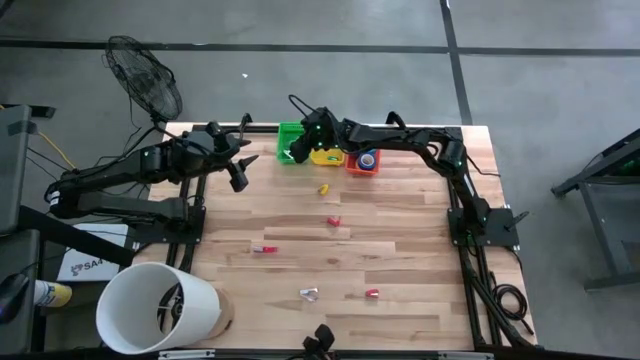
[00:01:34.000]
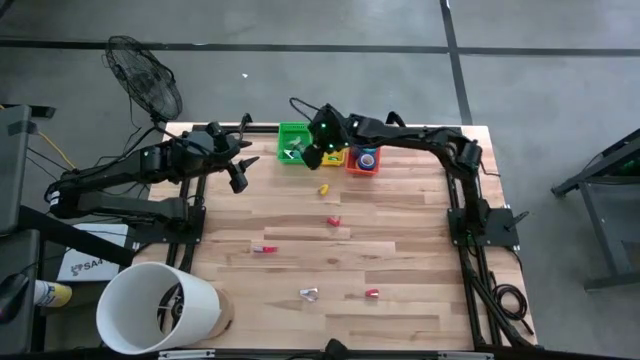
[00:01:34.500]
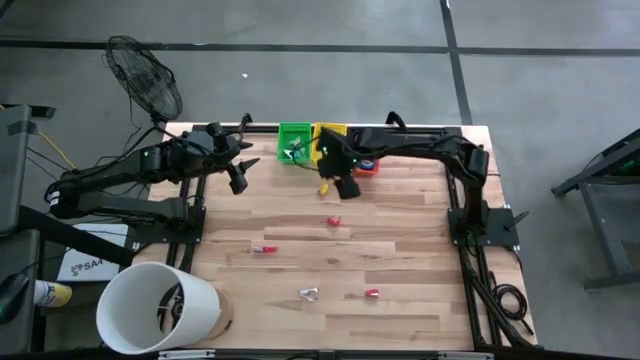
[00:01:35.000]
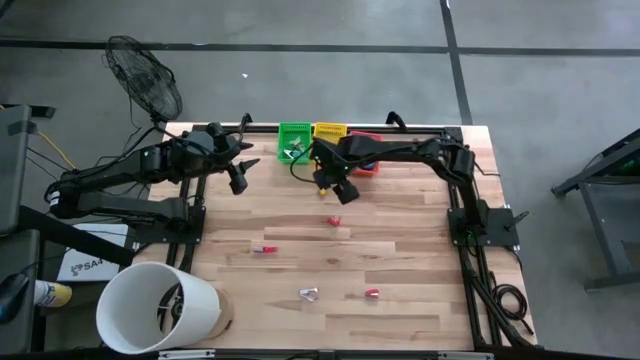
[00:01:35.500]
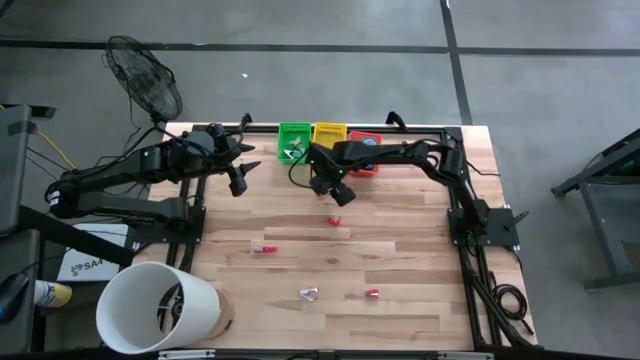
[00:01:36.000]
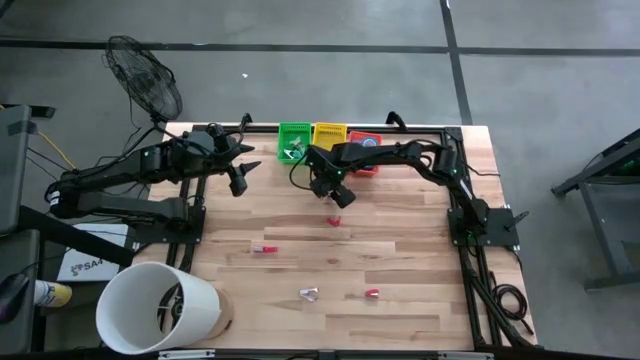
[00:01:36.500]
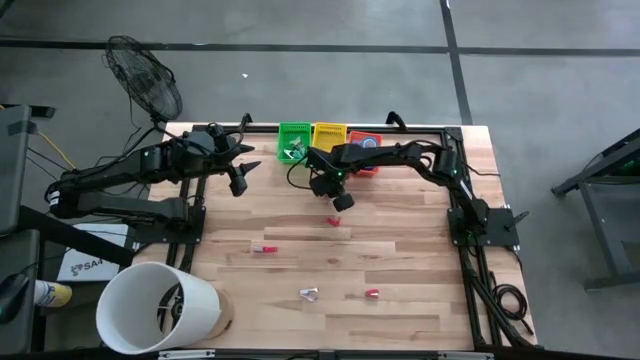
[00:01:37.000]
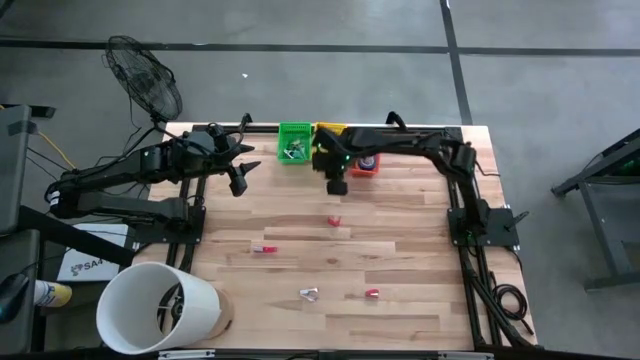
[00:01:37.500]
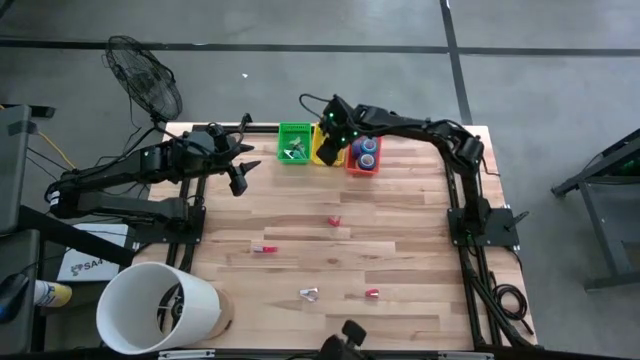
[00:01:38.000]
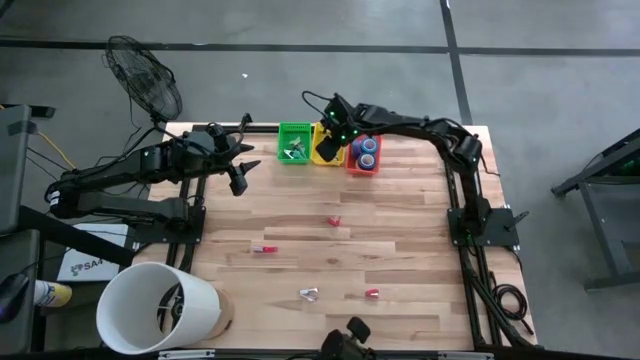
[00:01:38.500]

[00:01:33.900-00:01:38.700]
Task: Pick and place Stapler, Stapler remover, tape
Put the yellow stapler into the yellow bin

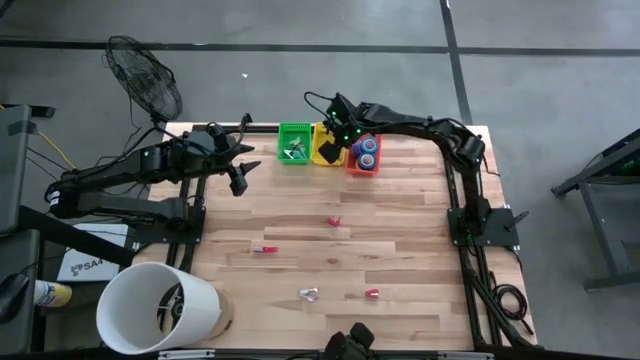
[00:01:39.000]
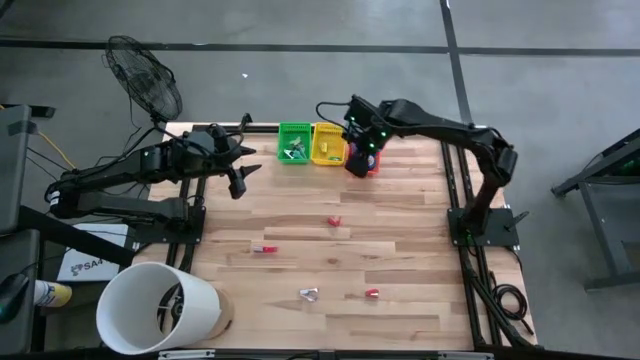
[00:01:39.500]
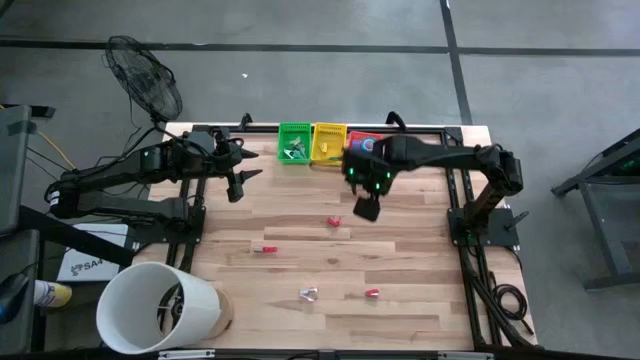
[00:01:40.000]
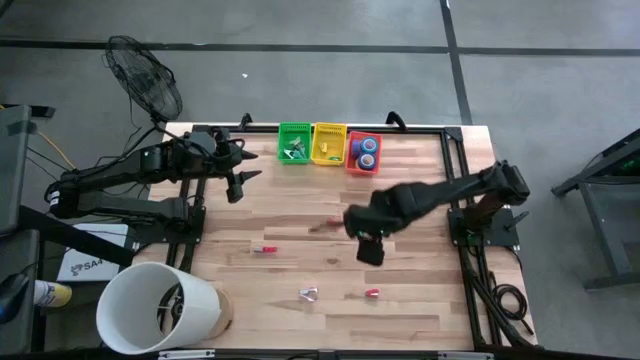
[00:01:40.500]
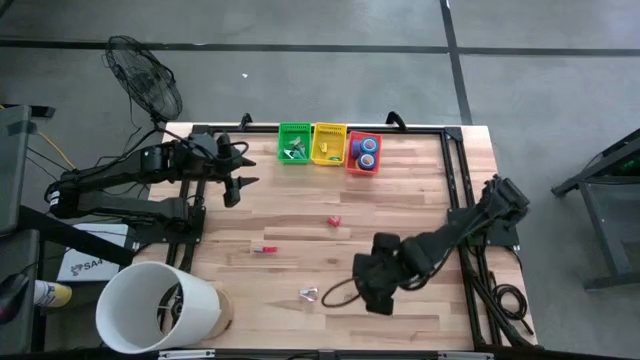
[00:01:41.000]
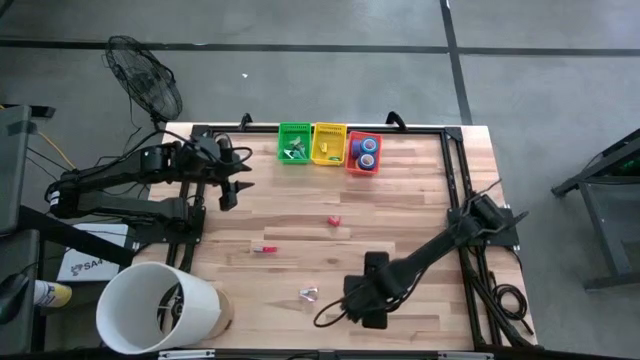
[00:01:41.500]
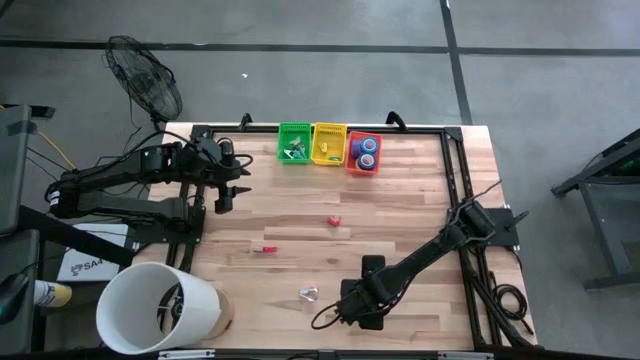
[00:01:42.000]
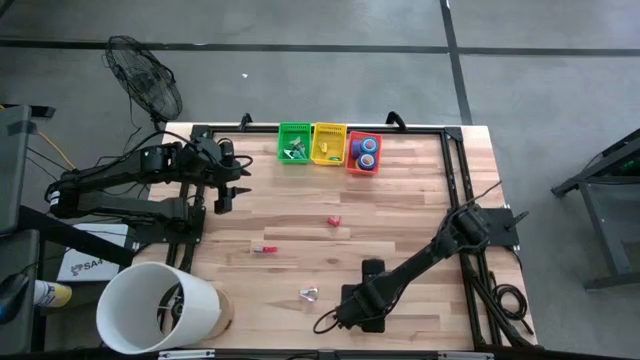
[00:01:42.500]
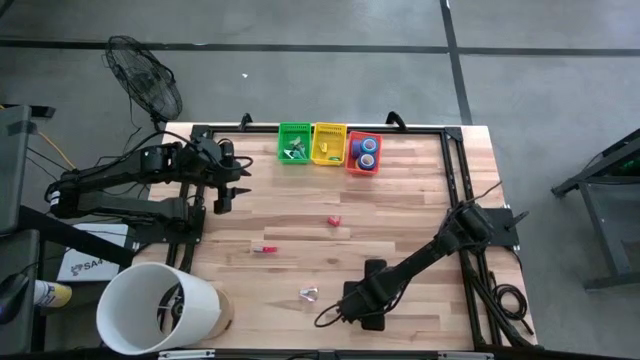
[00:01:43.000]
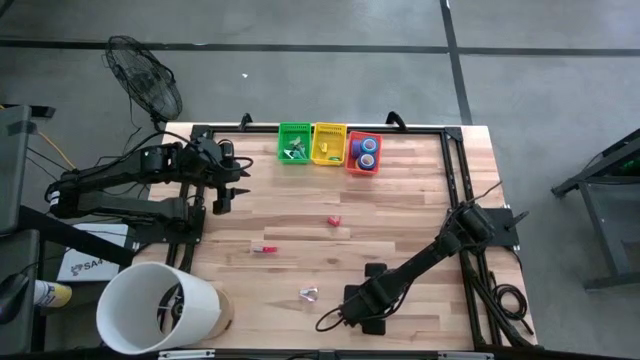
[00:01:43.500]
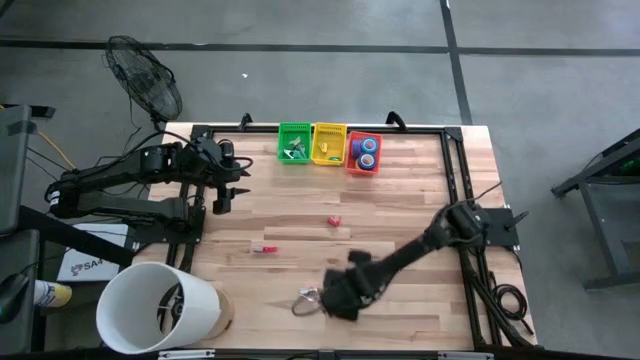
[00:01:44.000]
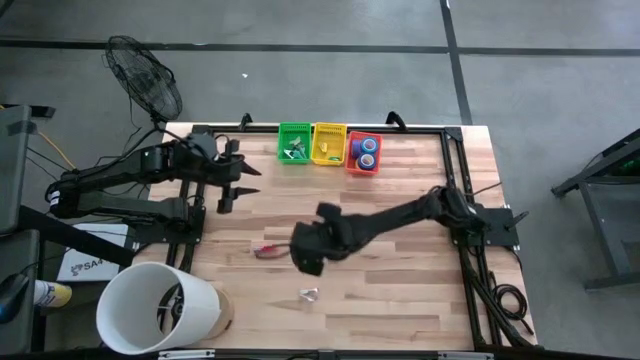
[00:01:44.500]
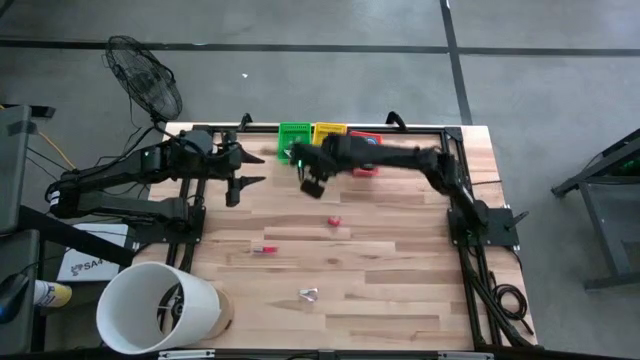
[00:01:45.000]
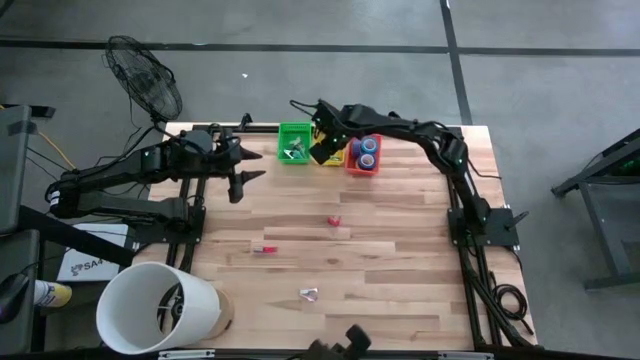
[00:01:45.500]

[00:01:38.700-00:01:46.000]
Put the bottom red stapler into the yellow bin

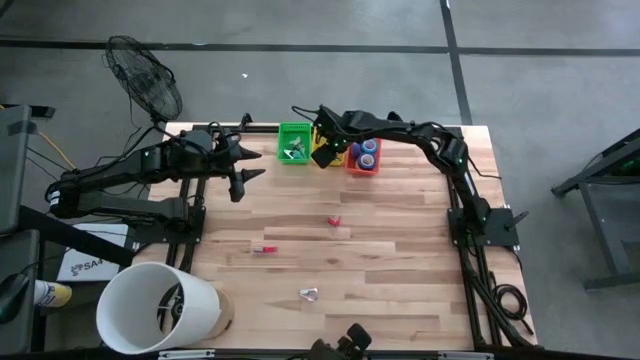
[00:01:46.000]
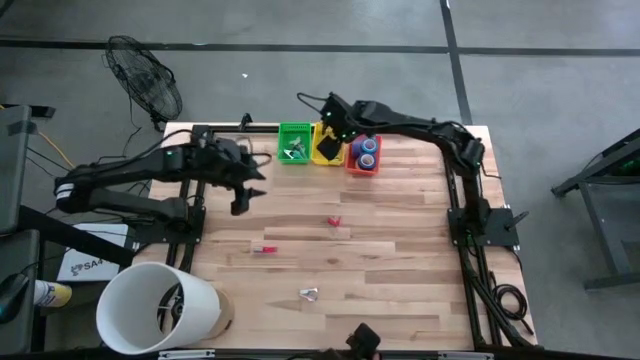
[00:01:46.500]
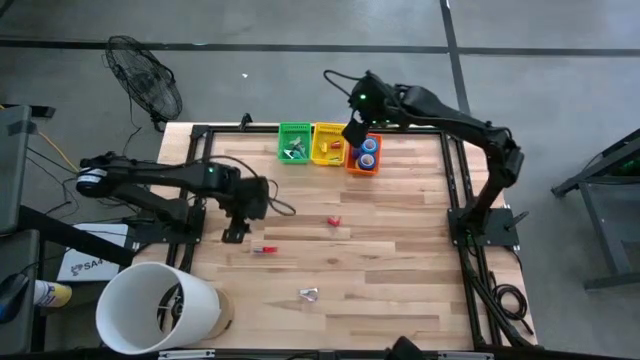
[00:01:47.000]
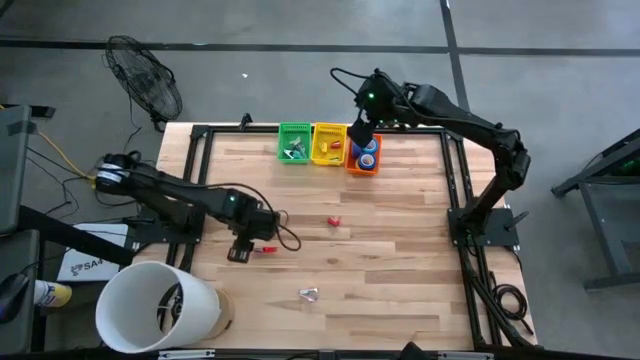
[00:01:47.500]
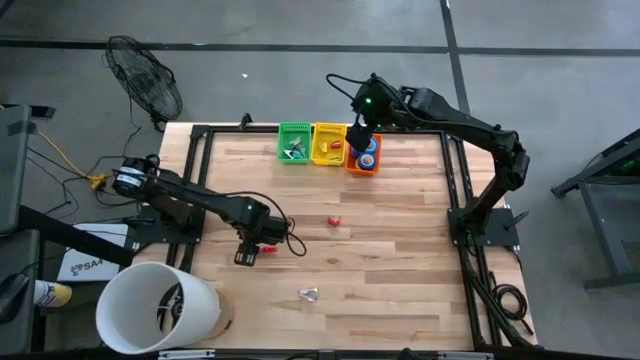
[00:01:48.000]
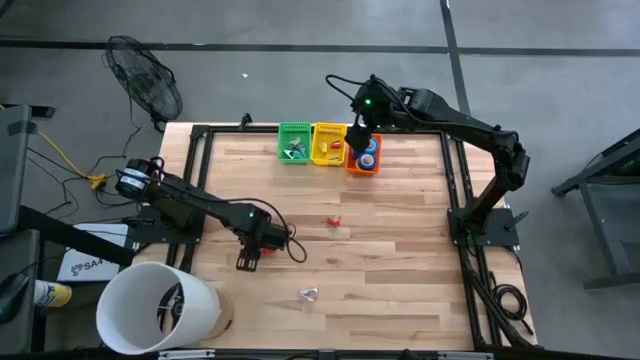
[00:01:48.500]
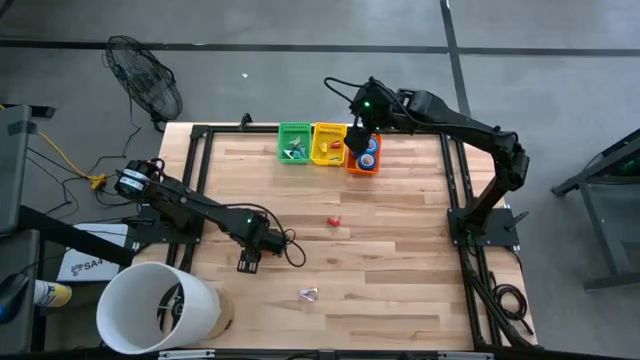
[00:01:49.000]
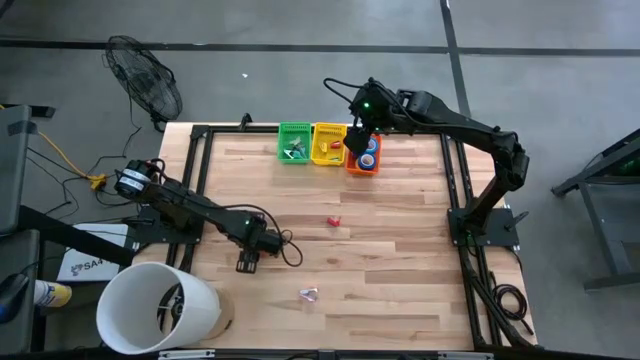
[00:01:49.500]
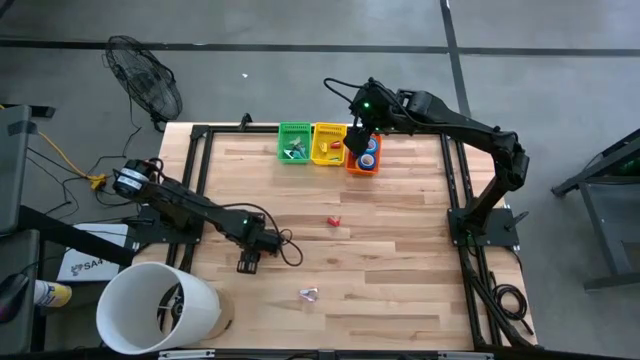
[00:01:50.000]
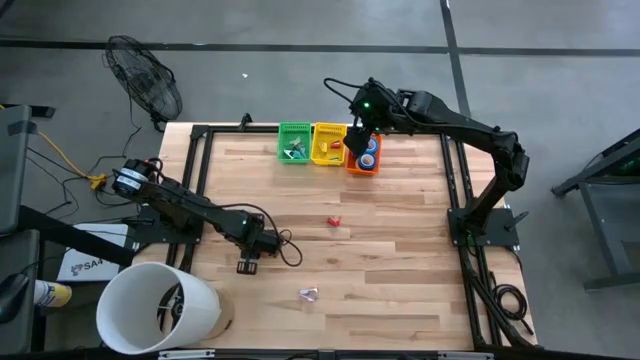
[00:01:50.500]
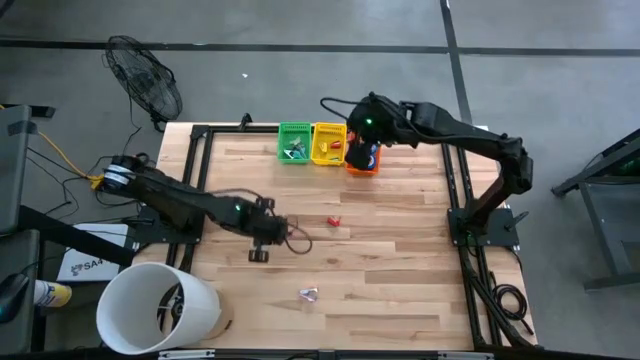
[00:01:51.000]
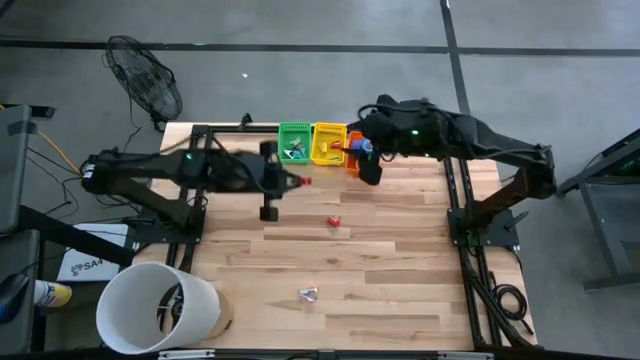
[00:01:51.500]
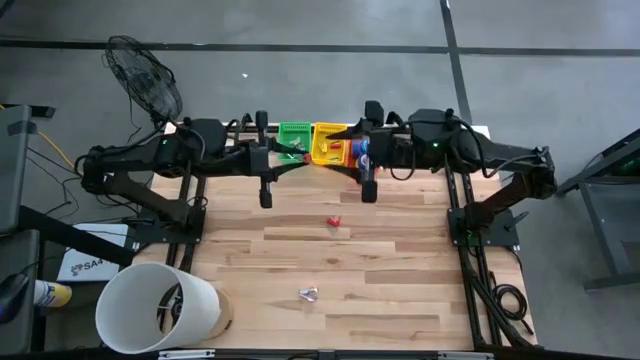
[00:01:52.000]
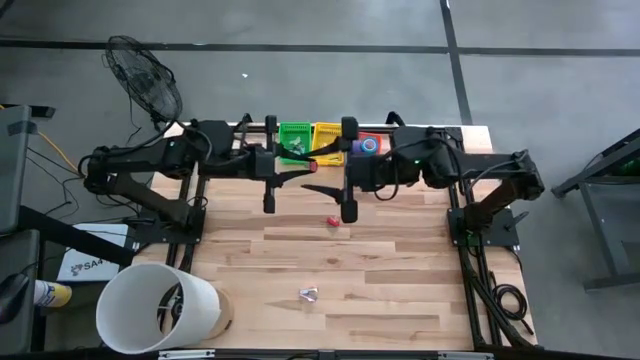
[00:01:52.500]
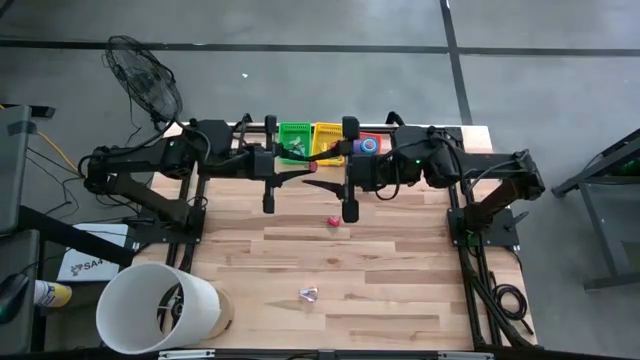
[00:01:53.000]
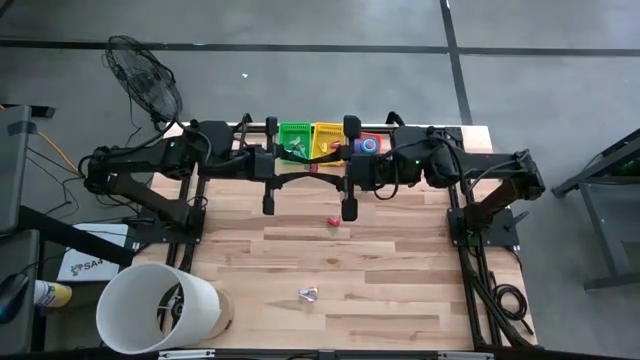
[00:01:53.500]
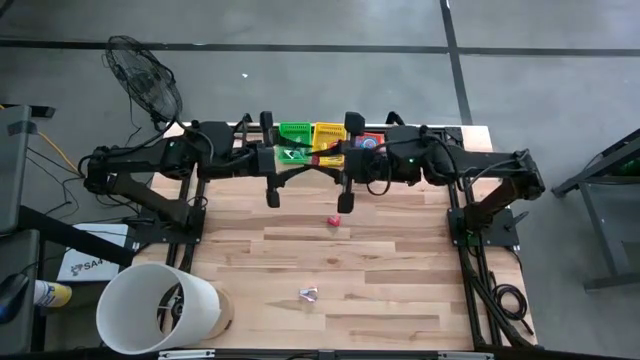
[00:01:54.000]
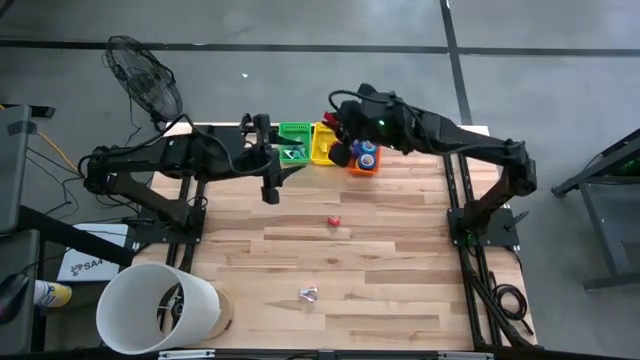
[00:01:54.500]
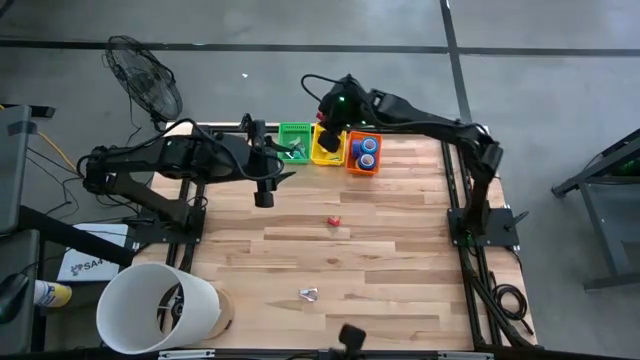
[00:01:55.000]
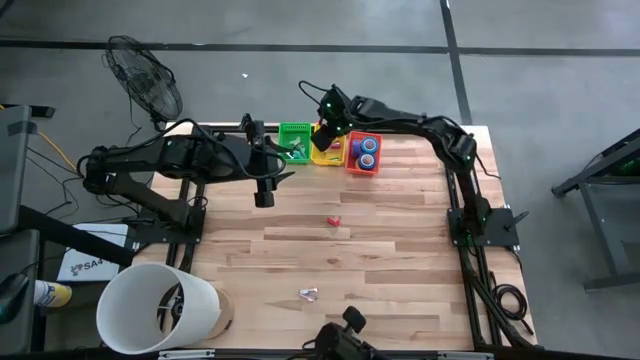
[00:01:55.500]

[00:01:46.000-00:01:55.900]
Put the left red stapler into the yellow bin
